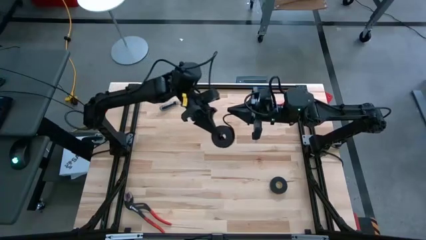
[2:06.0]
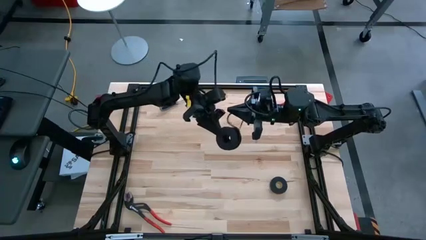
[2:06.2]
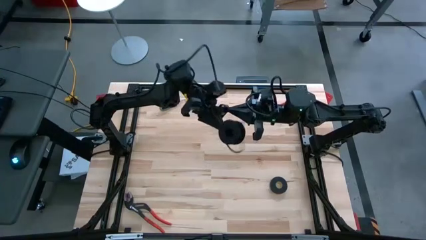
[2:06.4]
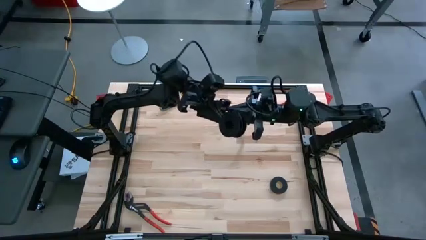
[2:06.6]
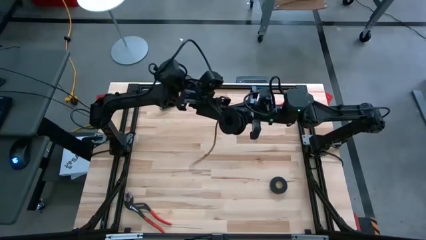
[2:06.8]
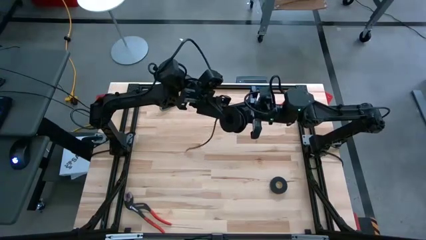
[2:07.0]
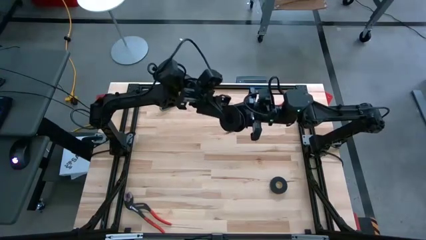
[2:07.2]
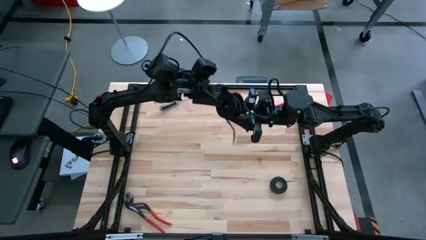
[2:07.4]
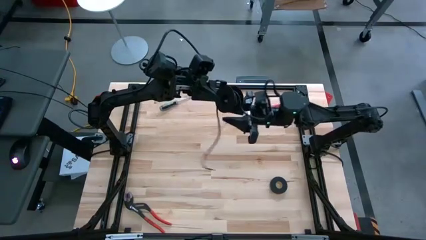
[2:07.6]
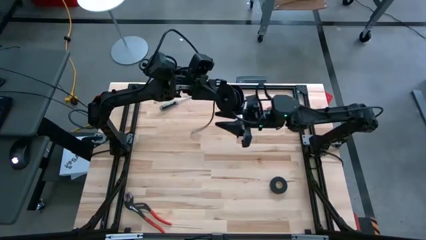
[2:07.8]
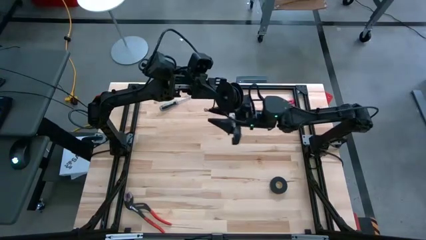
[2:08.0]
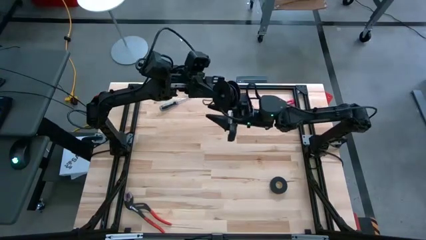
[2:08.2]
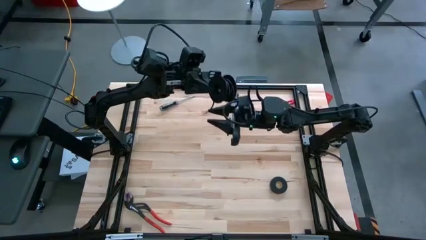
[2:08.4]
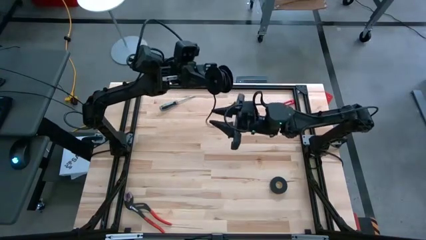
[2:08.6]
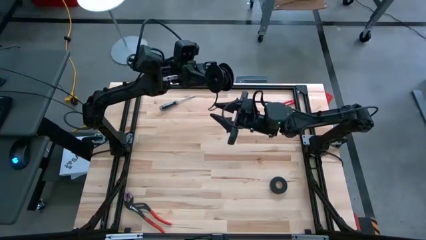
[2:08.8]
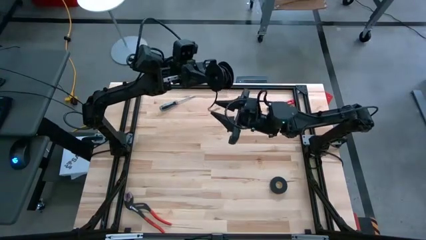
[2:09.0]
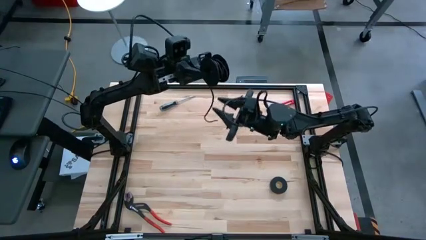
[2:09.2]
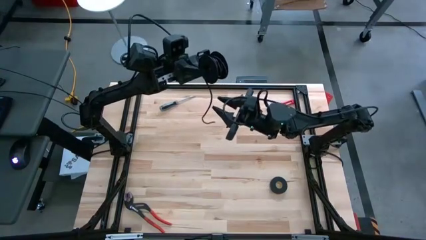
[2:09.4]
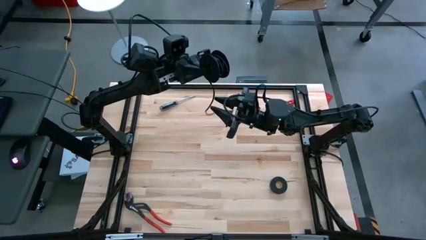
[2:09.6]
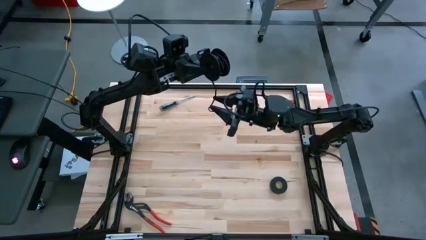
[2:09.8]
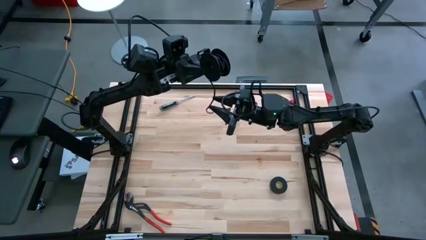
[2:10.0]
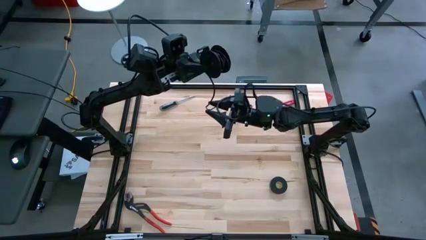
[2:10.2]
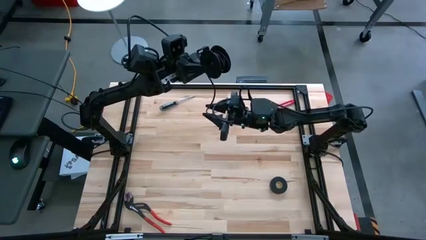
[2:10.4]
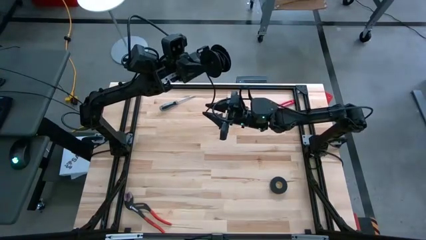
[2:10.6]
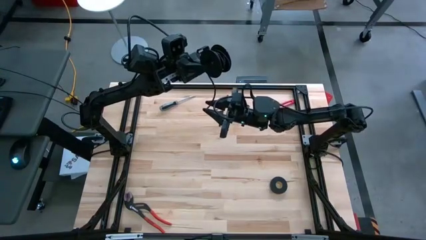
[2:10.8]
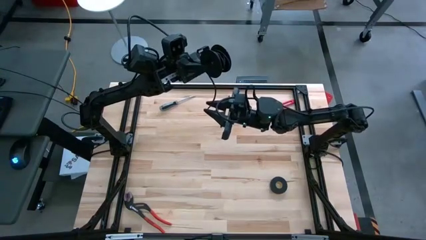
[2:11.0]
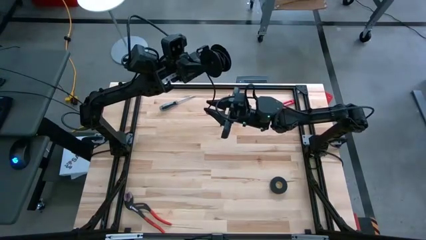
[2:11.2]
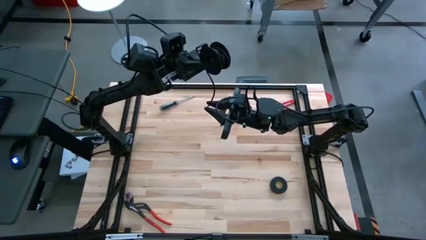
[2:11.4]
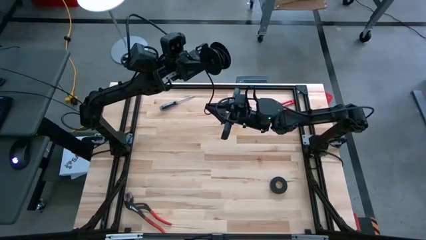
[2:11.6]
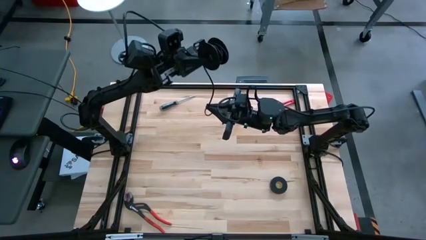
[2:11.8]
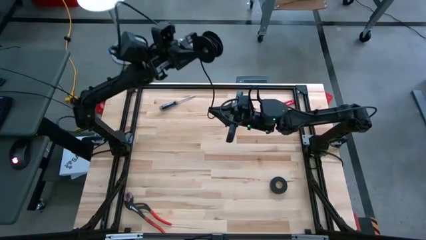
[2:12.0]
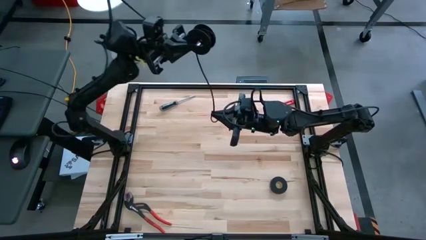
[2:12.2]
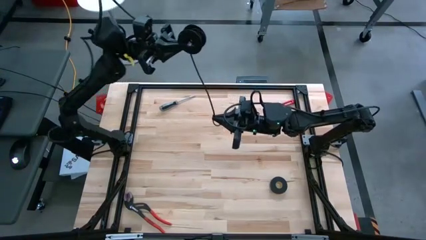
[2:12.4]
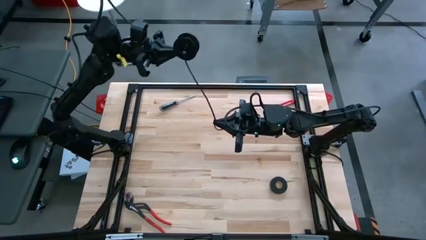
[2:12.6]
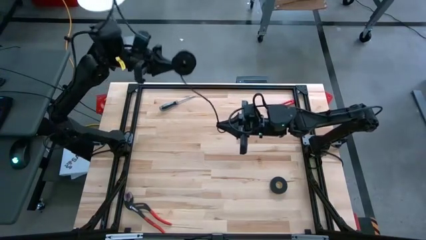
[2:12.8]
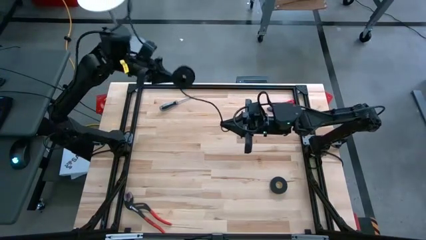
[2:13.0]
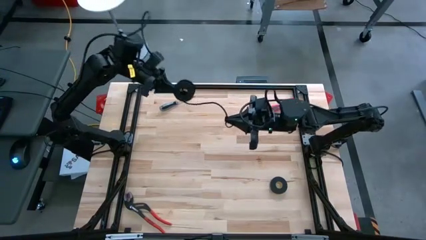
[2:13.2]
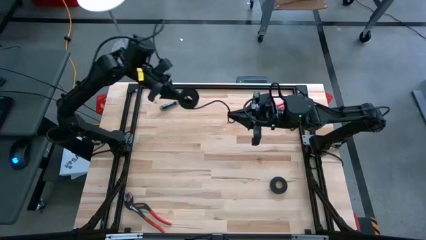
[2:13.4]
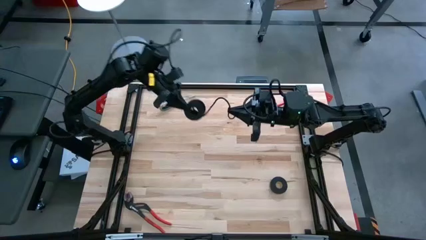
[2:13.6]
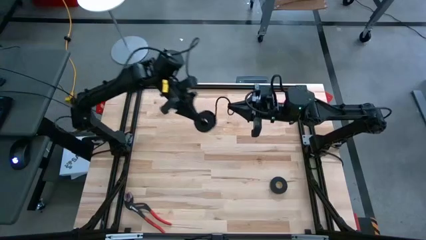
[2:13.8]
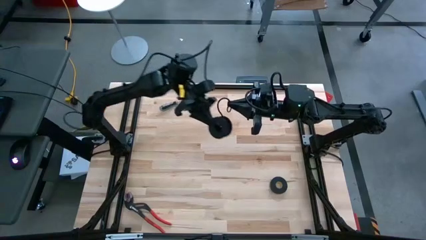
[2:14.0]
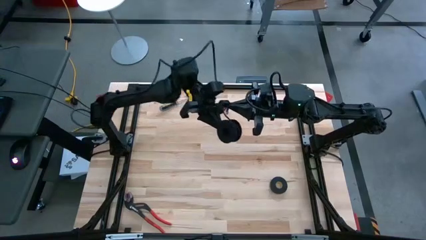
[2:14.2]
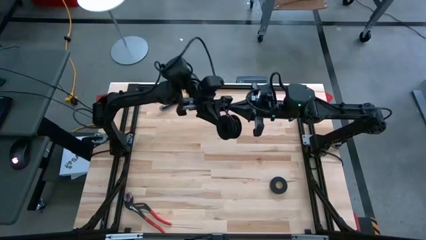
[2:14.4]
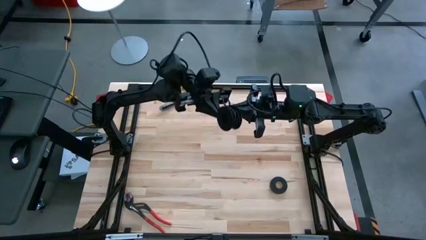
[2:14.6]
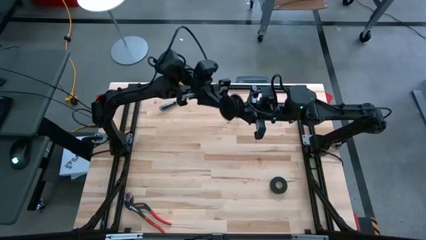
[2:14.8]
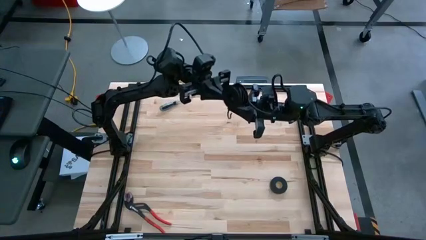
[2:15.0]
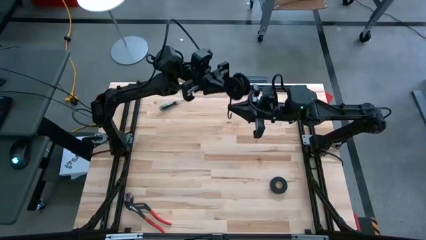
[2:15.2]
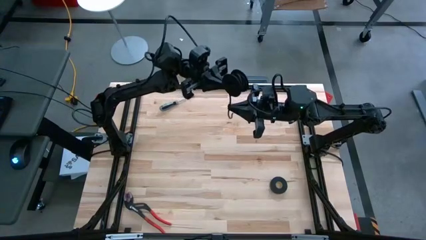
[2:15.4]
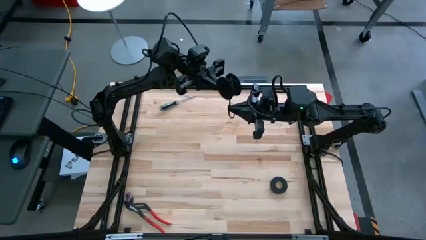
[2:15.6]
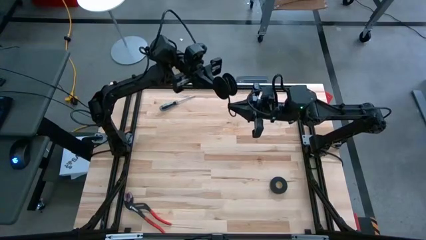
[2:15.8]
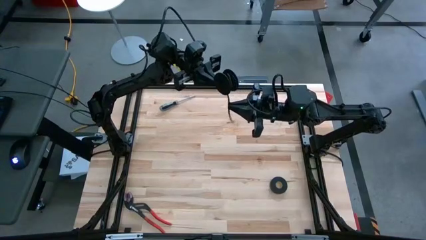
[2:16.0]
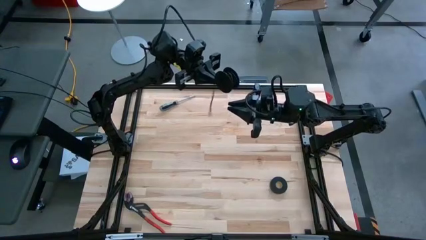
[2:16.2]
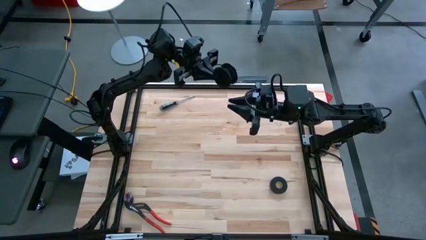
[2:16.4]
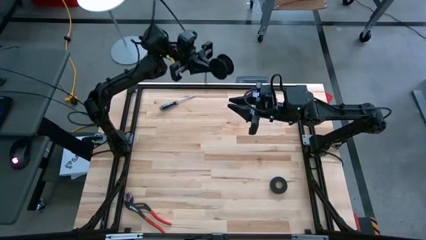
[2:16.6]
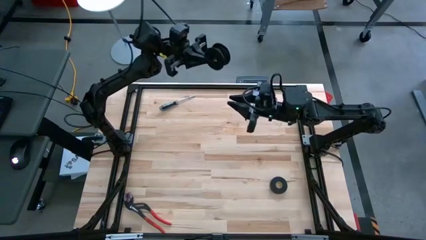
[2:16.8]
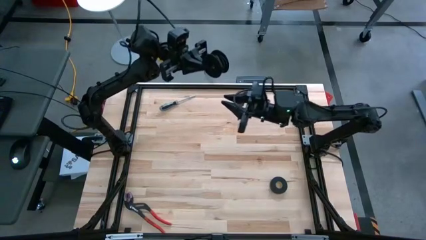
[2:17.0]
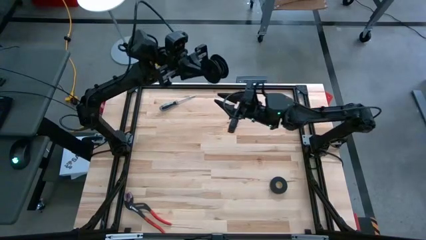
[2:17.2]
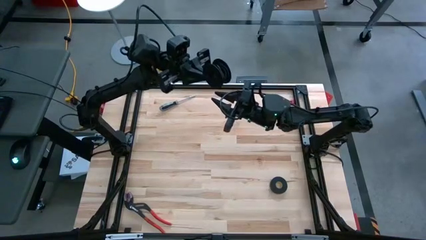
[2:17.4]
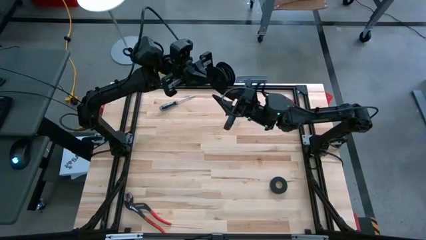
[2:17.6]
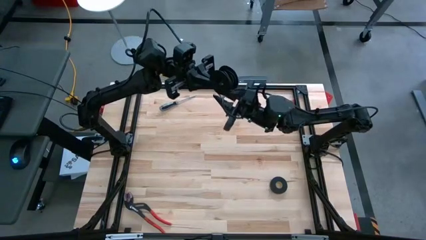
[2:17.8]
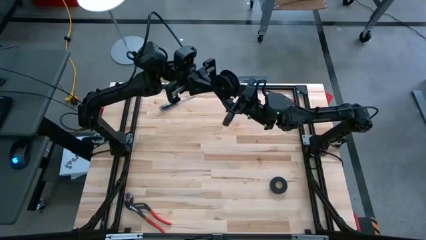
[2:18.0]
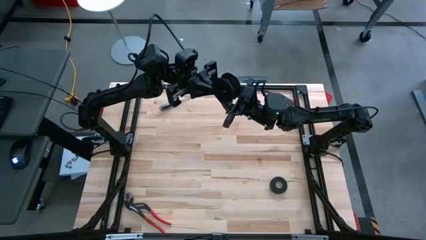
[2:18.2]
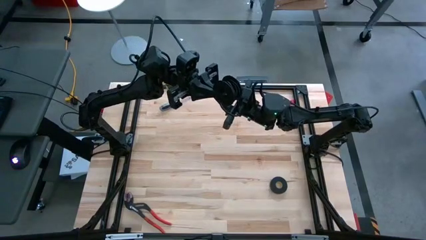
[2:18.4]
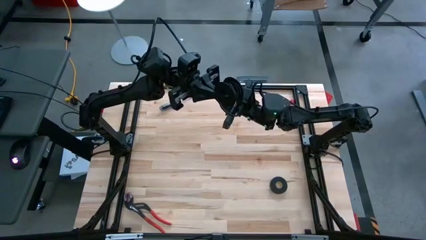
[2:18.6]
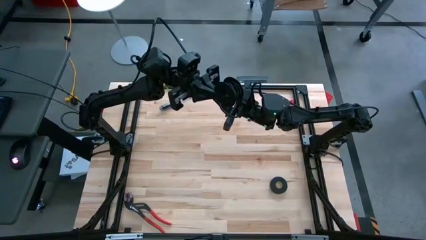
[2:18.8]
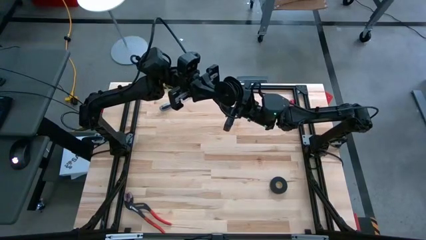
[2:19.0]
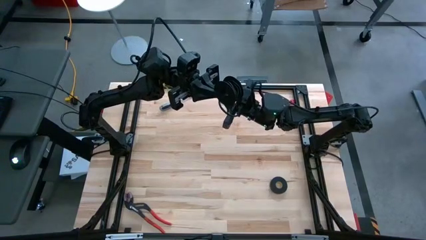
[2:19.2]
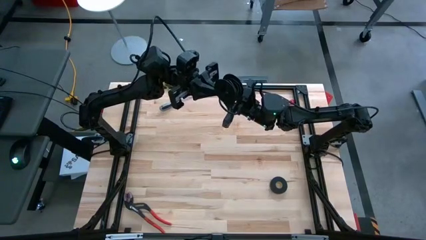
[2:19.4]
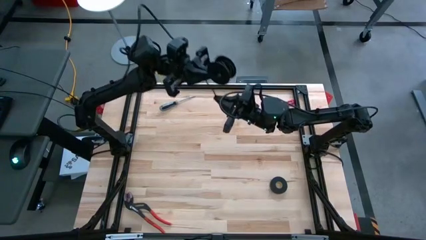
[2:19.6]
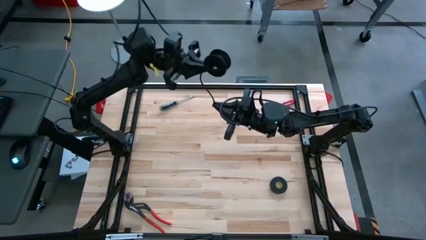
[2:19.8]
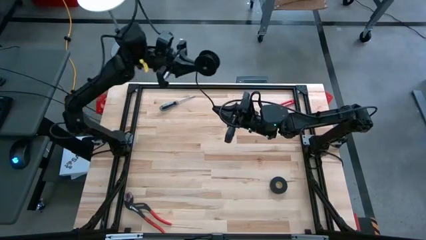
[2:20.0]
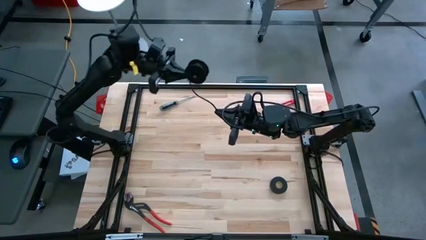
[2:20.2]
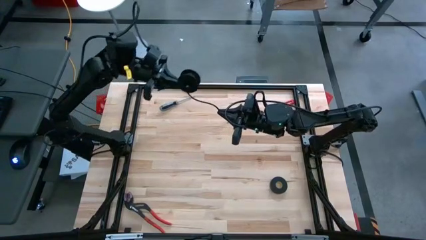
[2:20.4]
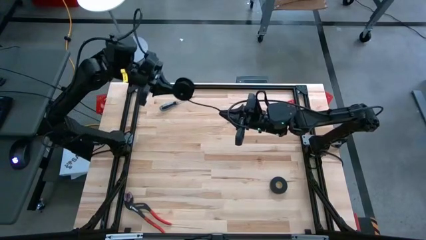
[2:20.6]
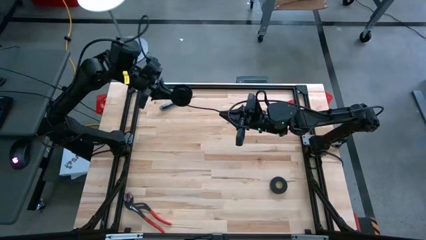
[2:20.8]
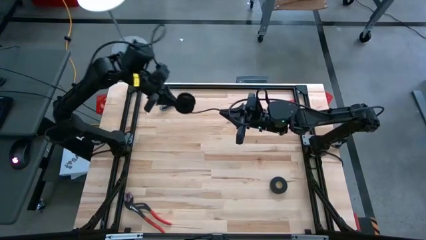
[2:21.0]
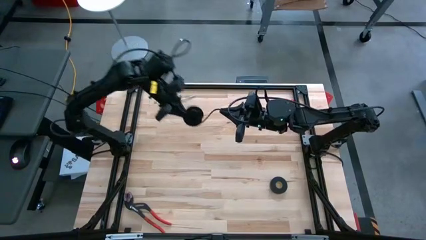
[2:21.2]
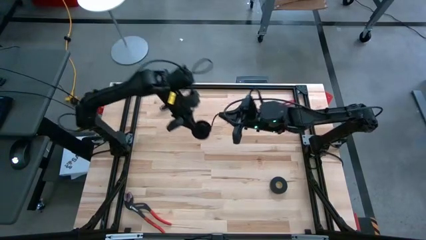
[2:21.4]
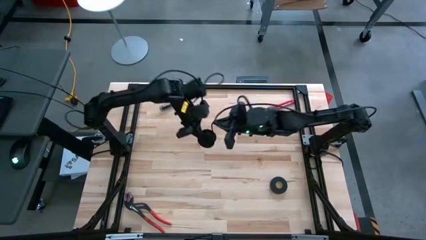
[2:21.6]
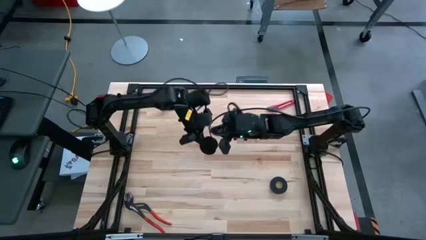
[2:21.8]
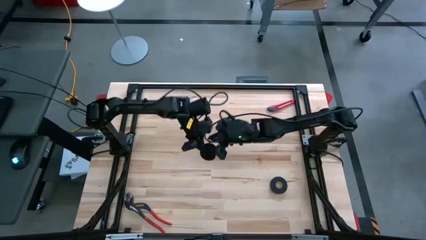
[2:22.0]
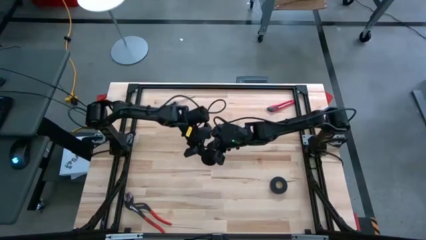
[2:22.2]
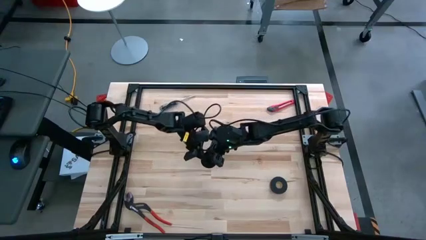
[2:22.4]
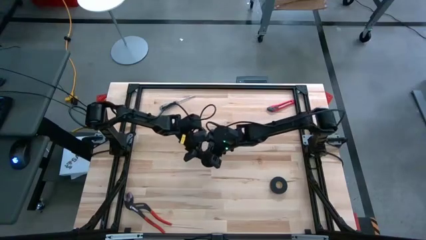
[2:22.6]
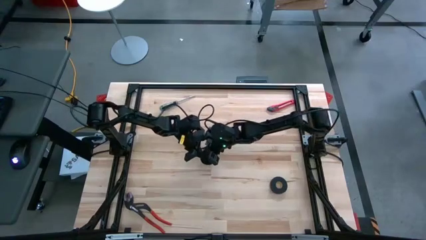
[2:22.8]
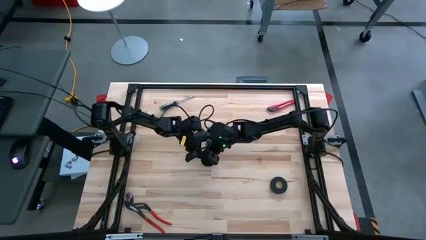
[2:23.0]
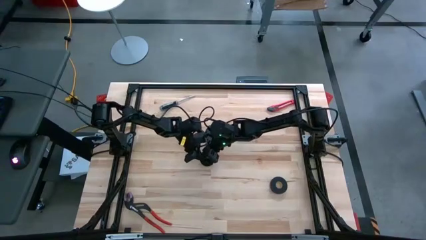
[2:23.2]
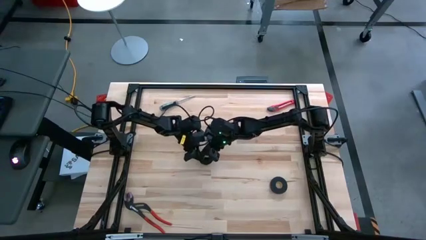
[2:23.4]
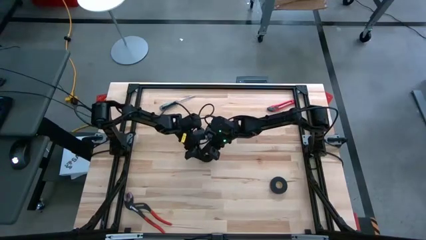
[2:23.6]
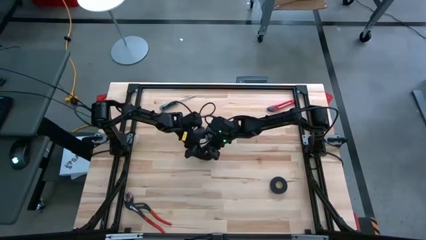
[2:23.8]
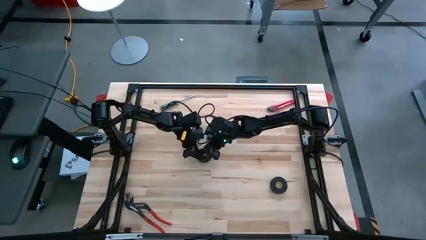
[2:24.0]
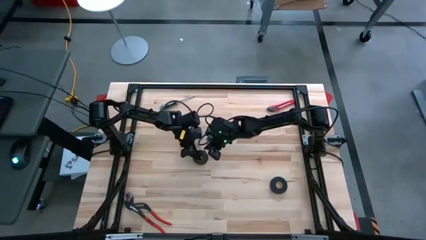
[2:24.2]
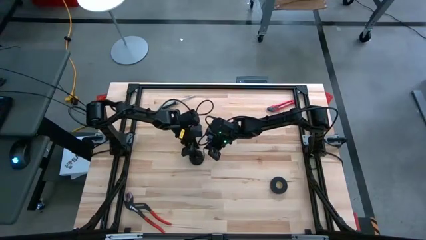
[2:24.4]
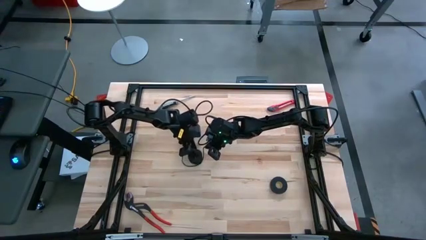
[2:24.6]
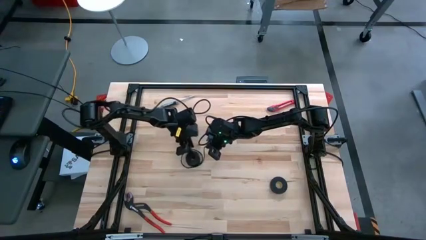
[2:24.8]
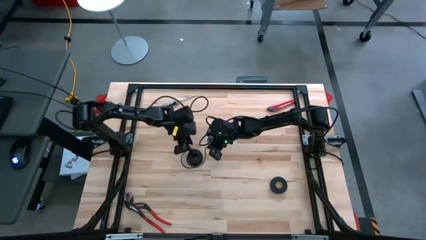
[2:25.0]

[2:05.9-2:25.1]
Task: Coil cords
Coil the black wire on the black spool
